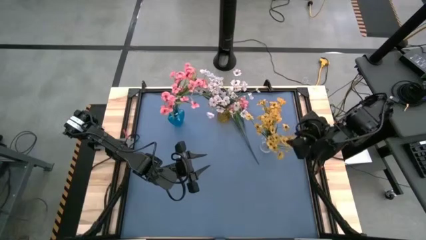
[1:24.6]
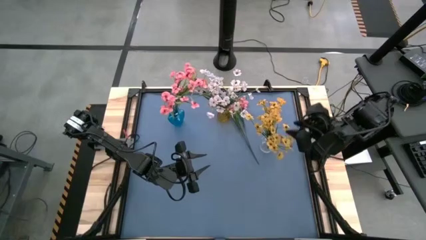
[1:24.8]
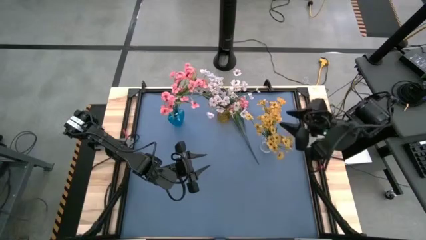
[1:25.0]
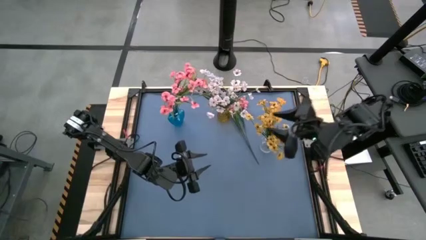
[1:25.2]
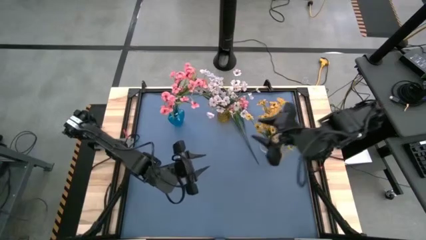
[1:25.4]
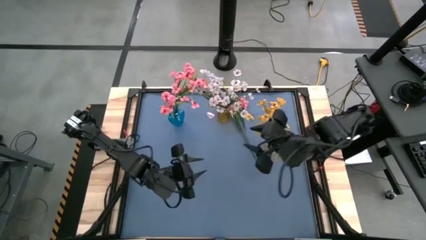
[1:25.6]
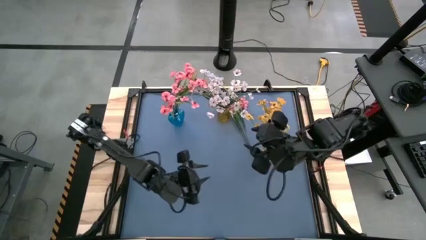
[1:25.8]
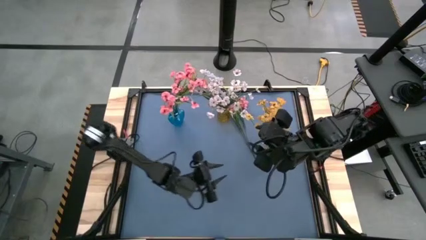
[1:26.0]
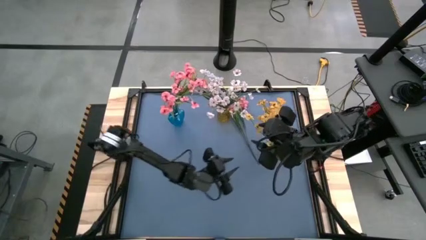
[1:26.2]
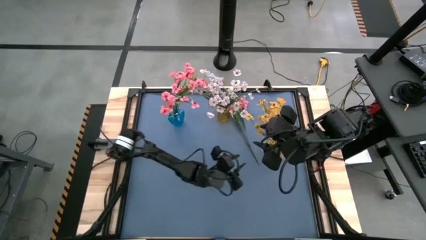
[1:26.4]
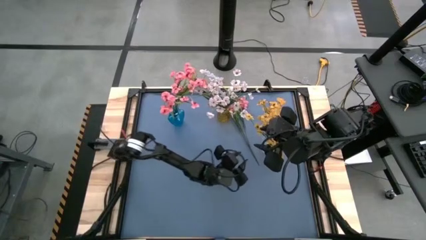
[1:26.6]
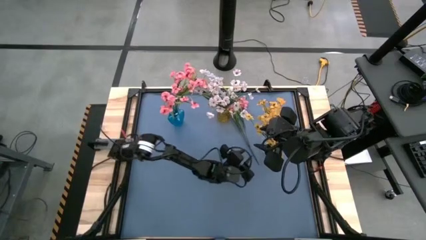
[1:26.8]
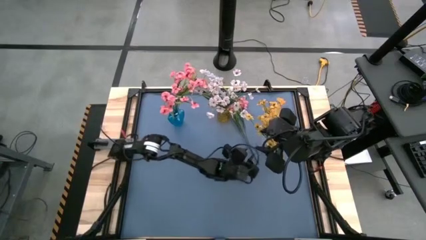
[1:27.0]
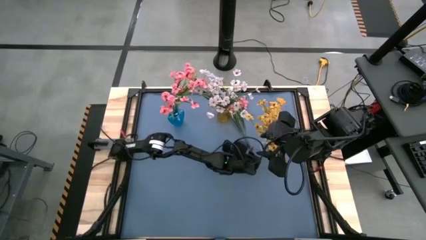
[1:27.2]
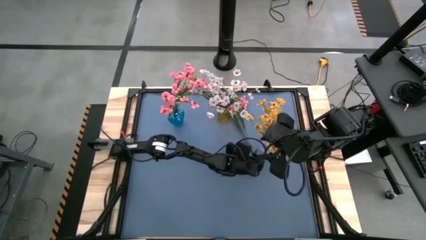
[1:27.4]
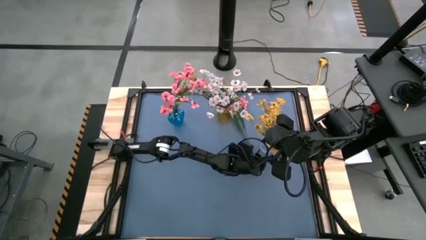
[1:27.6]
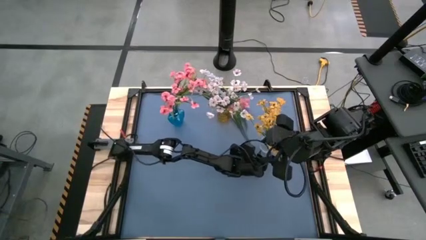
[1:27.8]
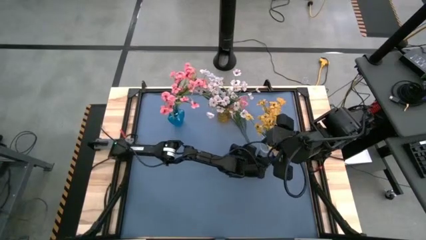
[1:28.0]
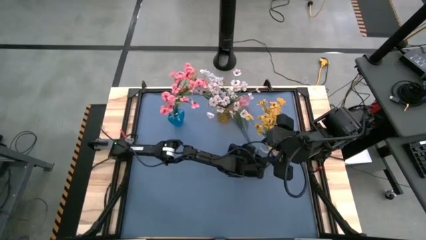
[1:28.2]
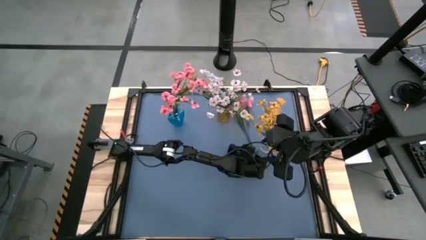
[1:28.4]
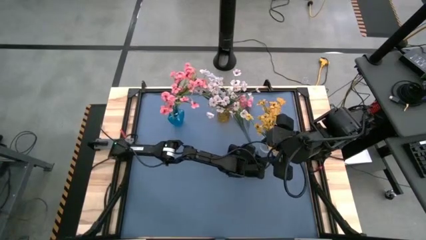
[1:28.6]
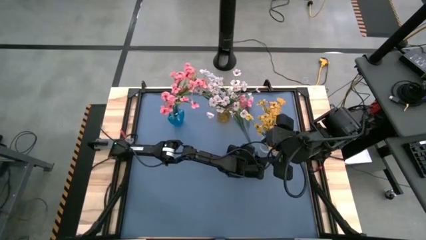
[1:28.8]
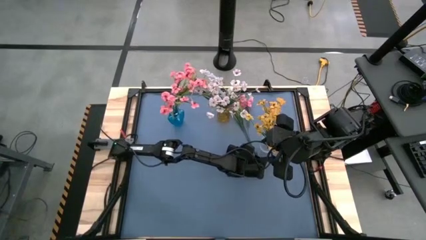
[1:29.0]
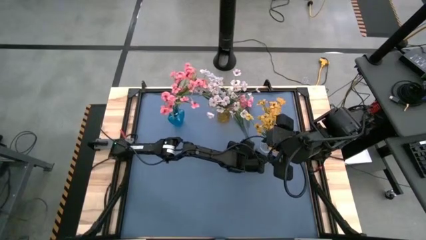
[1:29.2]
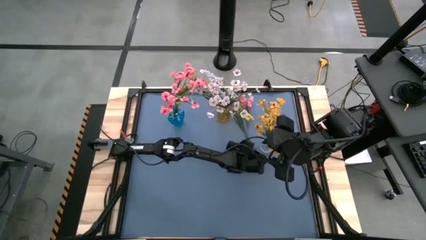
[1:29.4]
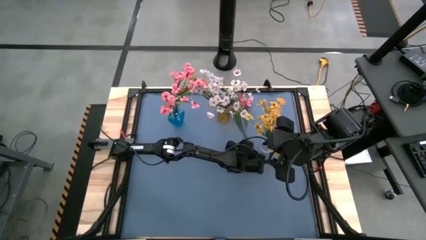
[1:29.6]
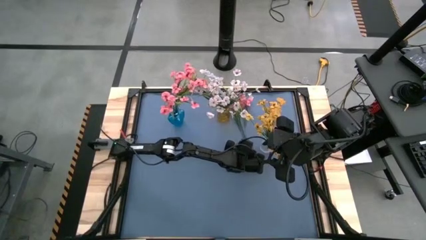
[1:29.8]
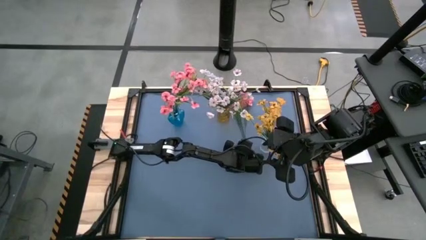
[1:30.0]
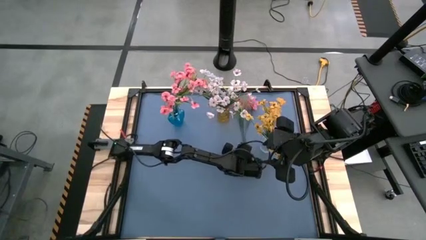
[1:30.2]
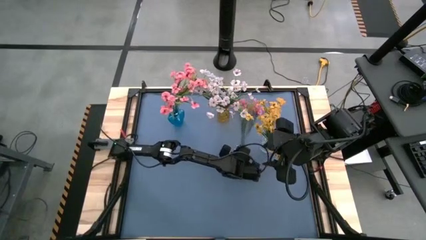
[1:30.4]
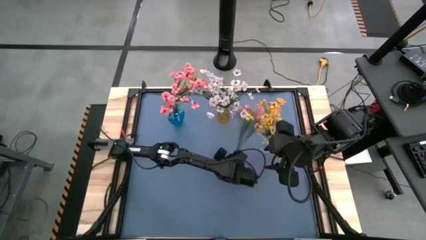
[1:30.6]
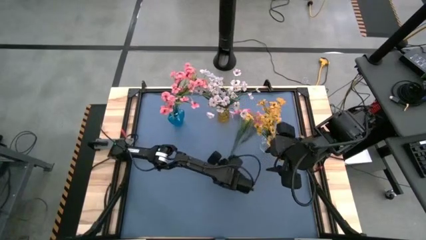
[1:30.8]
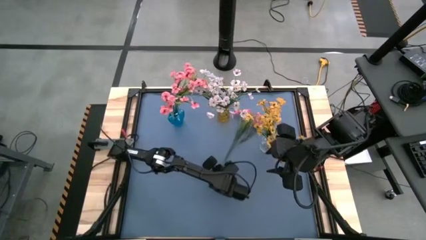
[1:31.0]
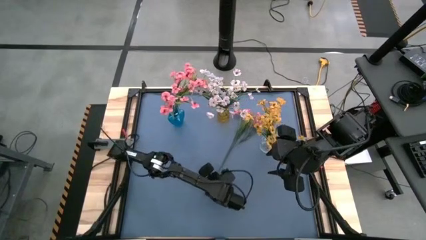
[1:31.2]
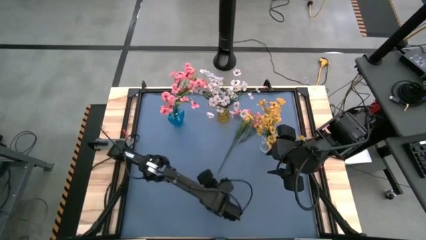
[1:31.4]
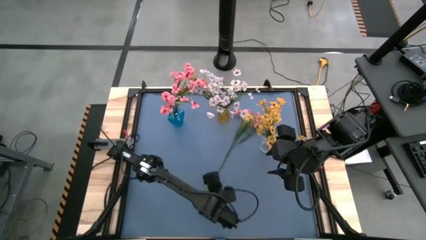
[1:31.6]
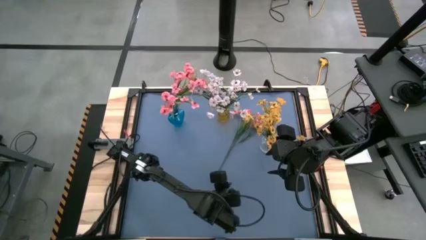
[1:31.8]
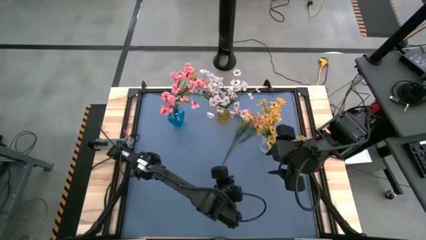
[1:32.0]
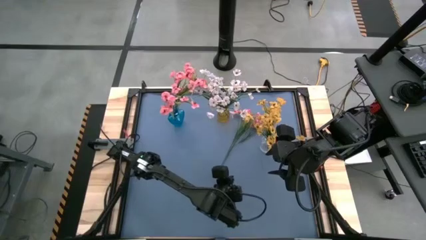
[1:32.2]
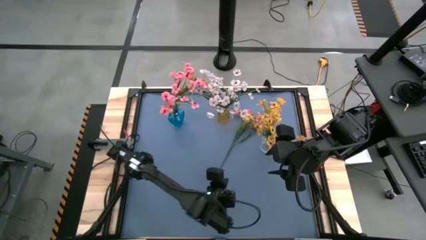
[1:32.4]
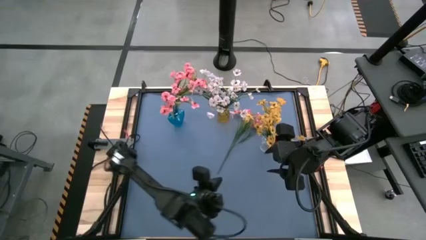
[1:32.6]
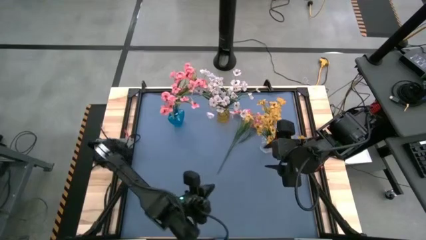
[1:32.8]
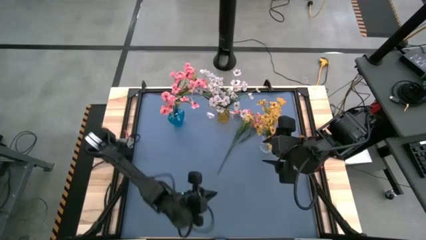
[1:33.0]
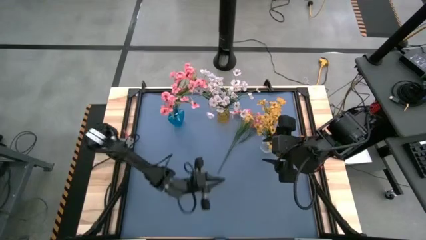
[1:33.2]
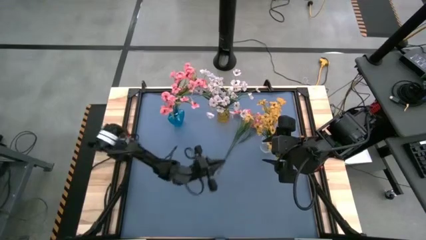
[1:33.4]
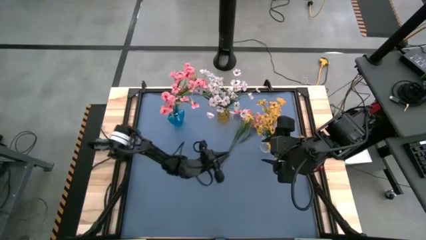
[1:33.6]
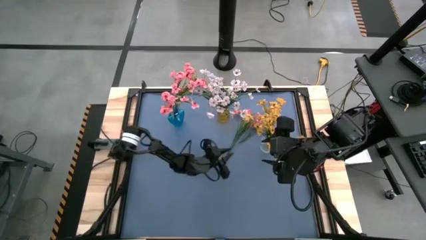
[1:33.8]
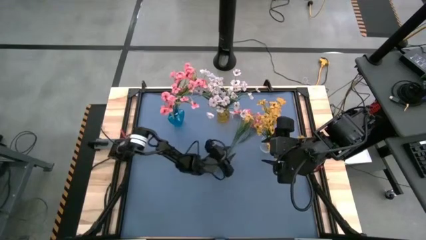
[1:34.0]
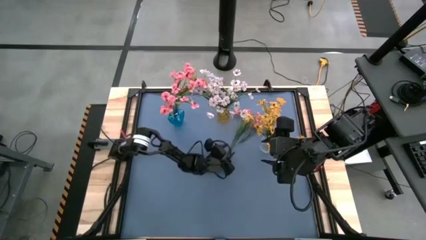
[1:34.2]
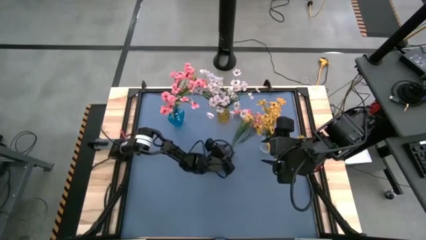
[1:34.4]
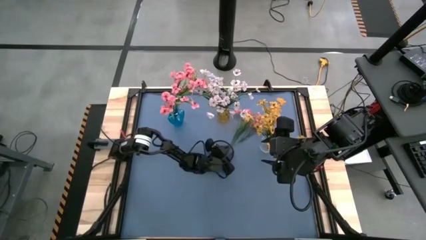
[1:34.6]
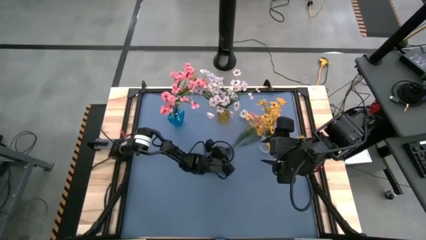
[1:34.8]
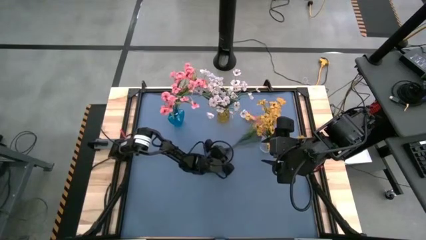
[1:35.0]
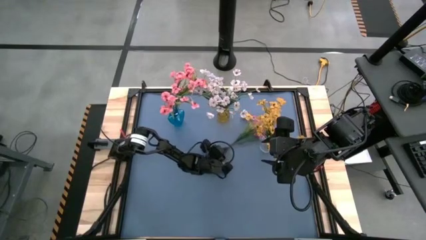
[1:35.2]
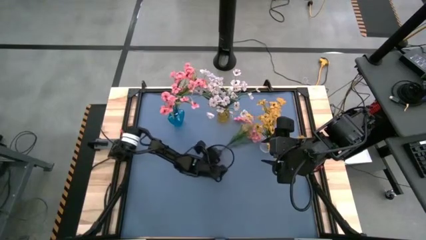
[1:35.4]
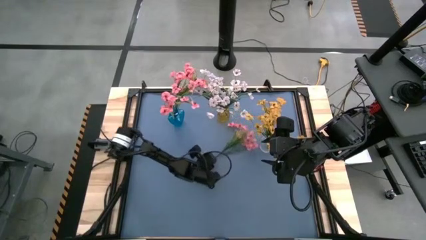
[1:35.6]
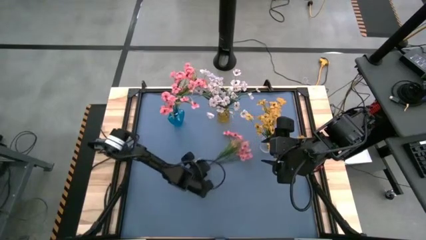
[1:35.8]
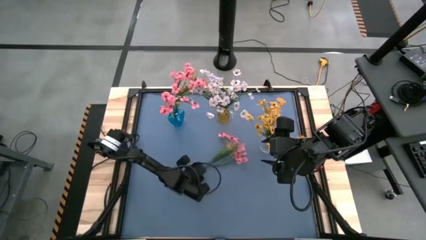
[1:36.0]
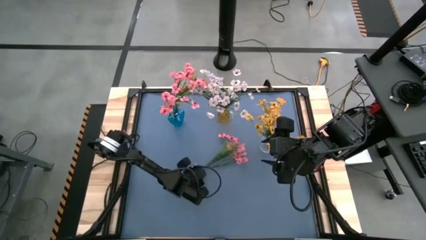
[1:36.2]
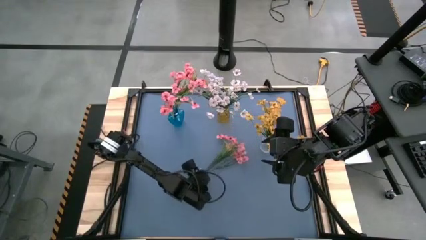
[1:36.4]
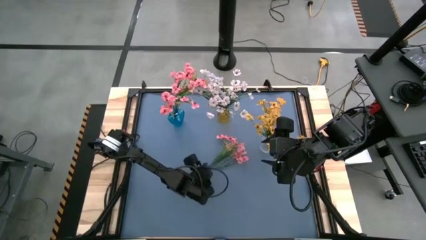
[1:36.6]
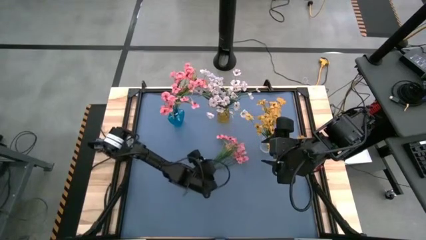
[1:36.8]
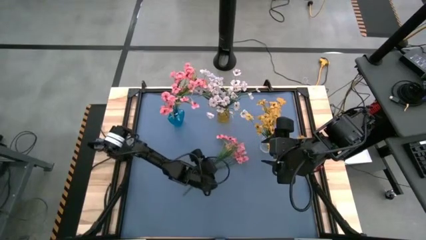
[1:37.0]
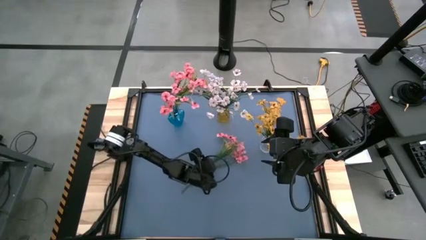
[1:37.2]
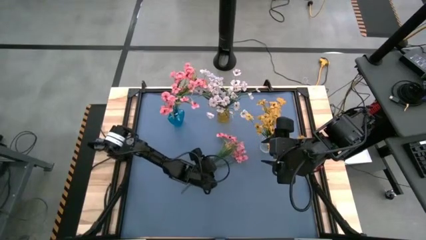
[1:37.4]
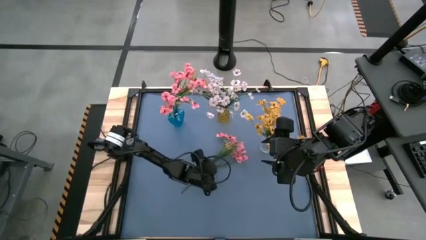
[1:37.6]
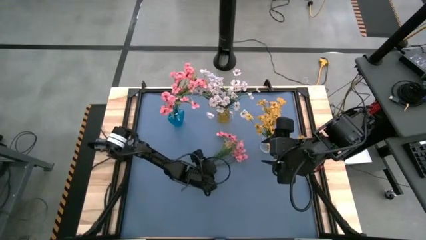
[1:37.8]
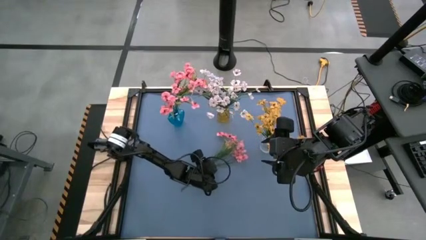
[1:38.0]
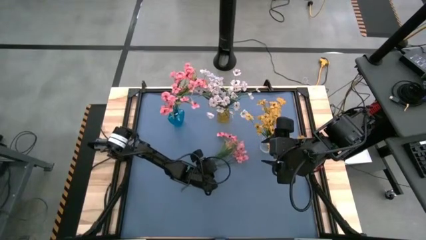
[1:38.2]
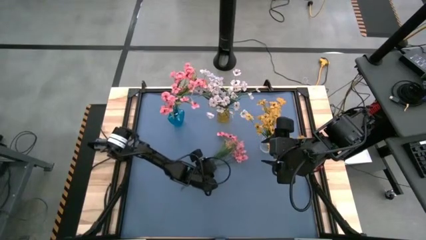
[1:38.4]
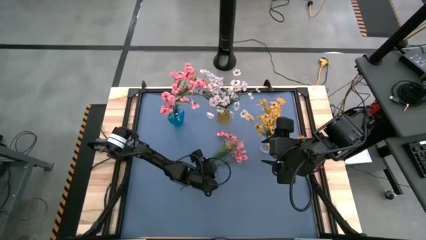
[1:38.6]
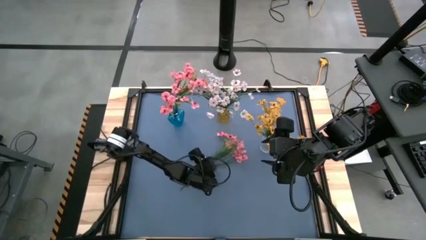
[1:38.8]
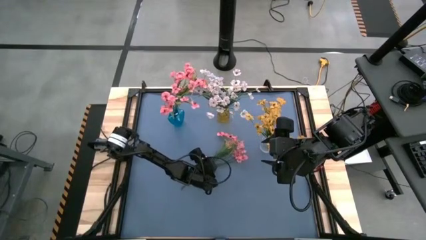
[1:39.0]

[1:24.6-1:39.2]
Task: Sort flowers into vase by color
Put the pink flowers into the blue vase
